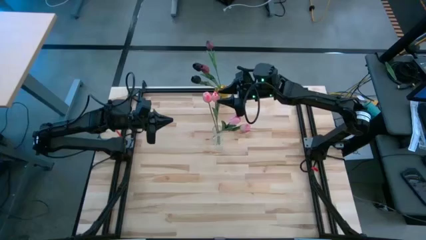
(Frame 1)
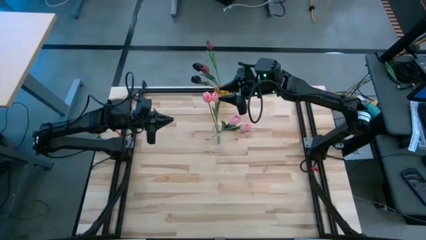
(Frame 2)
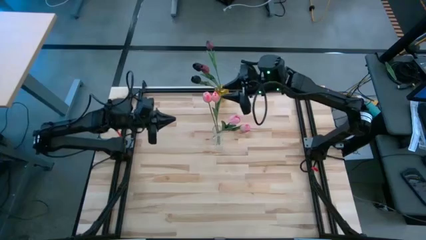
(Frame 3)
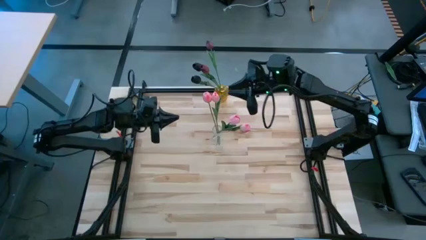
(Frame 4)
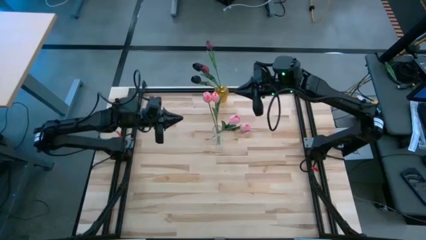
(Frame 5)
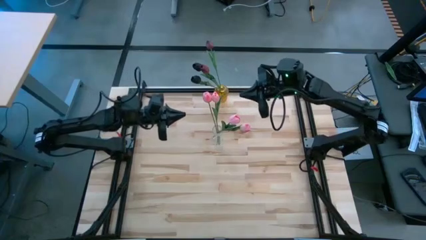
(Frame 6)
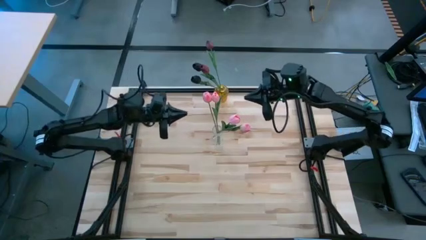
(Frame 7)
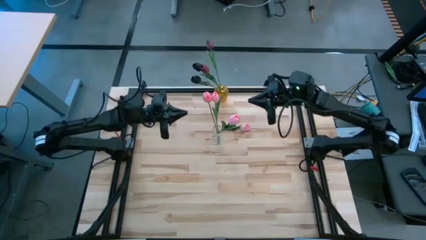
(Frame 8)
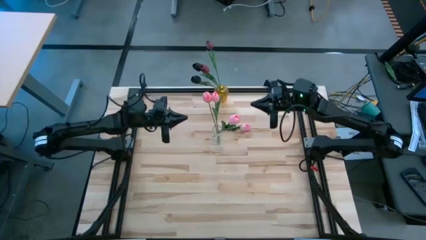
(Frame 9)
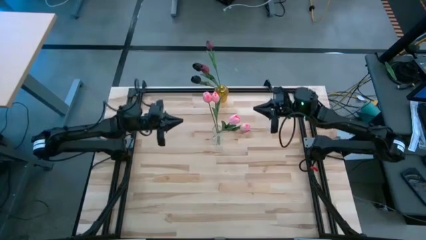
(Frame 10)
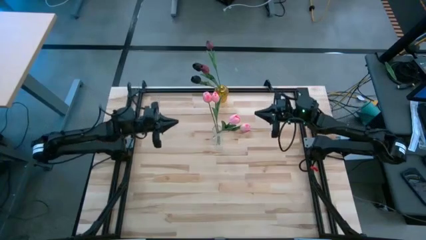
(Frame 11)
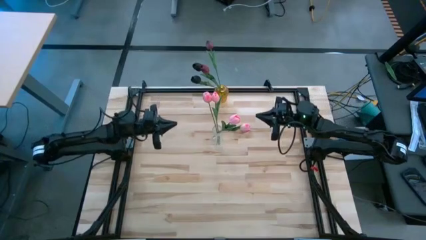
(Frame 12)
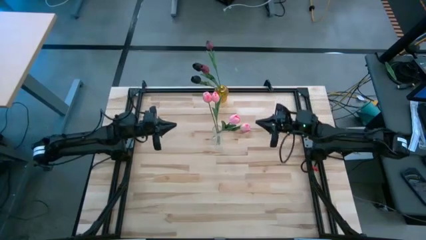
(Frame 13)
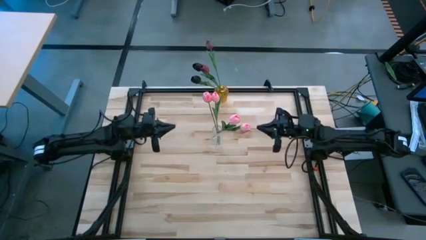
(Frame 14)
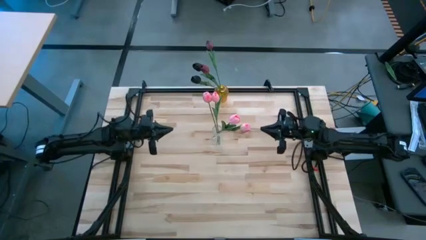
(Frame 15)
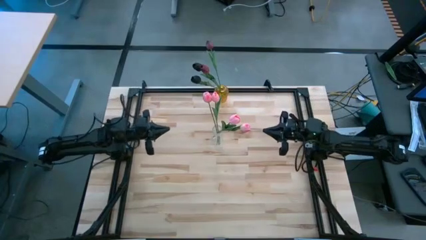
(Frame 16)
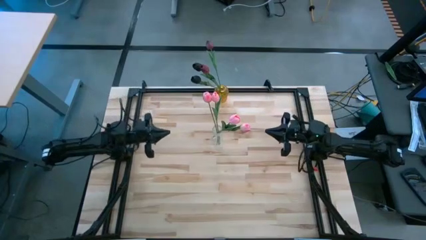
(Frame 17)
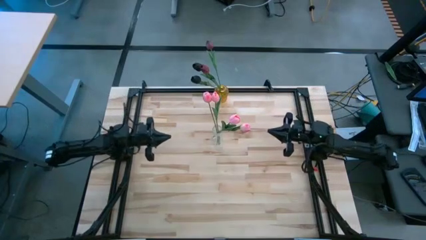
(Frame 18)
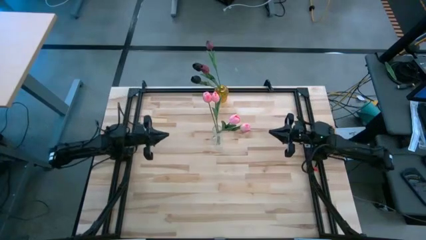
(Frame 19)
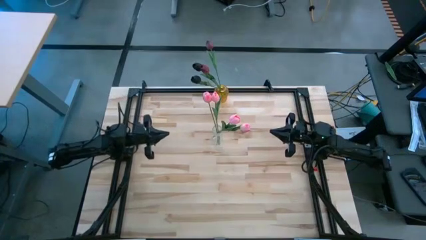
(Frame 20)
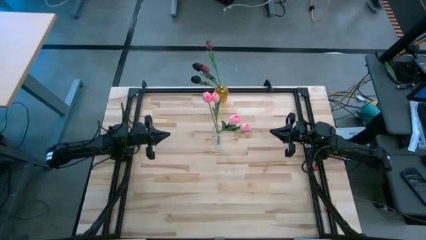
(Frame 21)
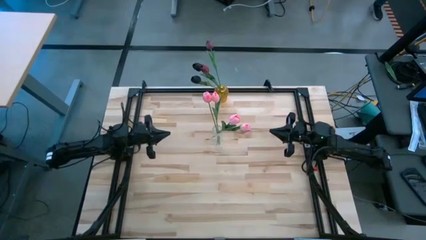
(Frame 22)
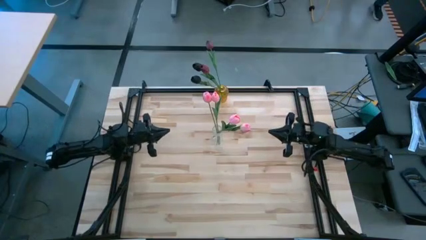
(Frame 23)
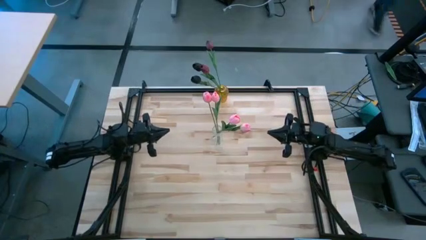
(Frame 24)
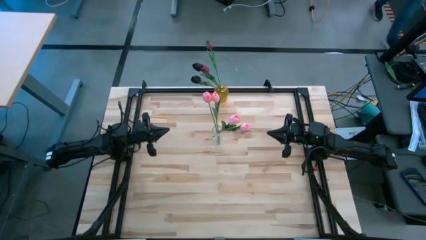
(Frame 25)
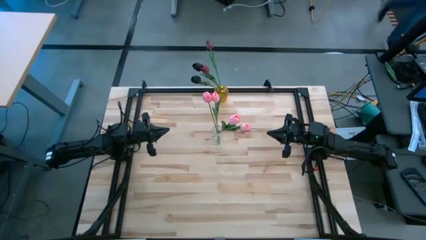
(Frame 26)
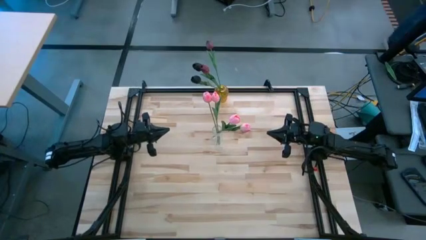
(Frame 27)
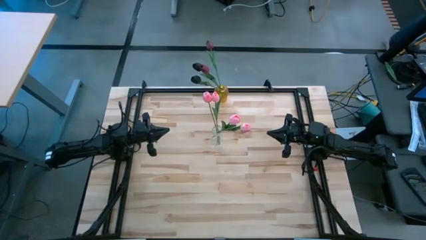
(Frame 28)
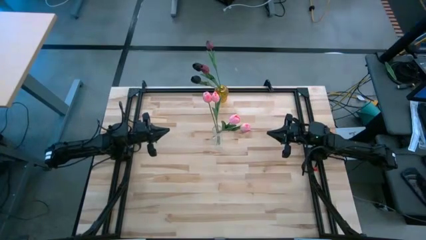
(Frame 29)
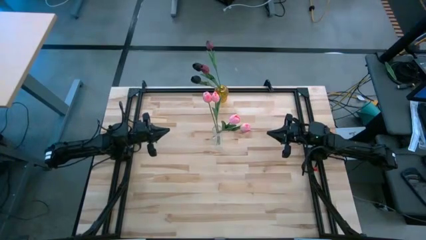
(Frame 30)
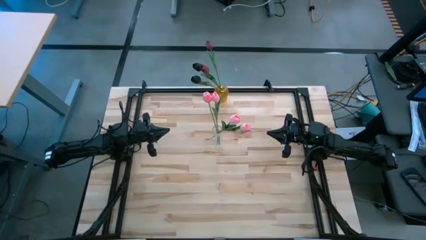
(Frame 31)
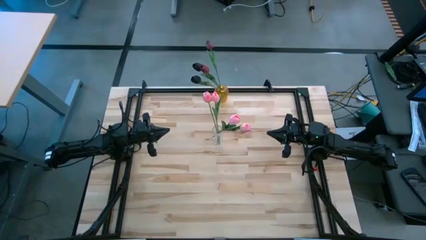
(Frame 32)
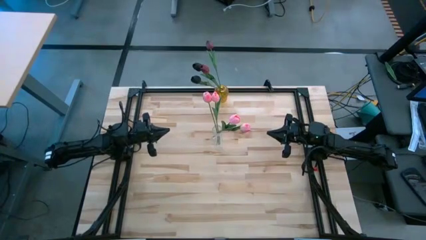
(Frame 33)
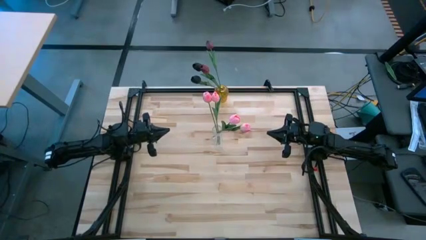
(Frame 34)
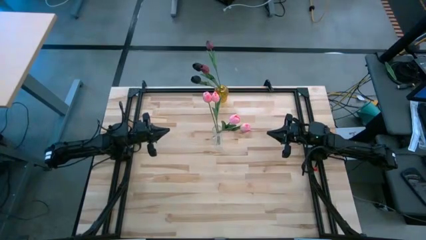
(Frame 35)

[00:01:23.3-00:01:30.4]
Task: Sort flowers into vase by color
Return To Home Position

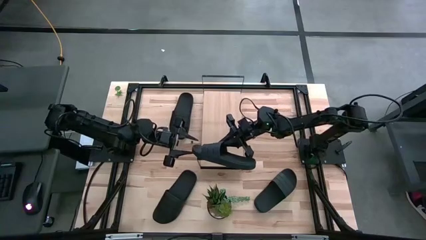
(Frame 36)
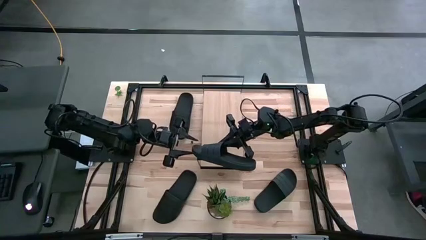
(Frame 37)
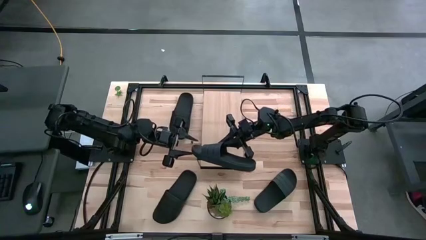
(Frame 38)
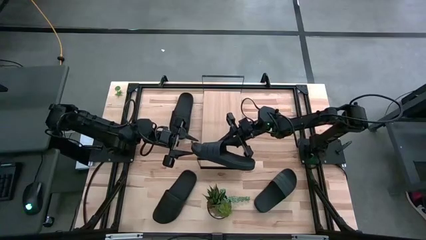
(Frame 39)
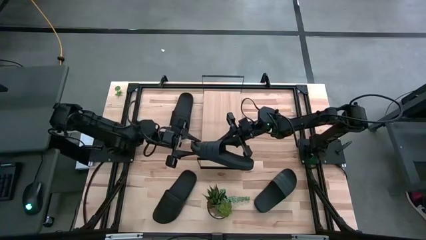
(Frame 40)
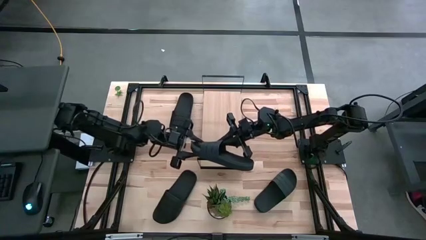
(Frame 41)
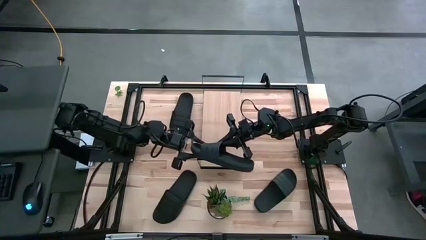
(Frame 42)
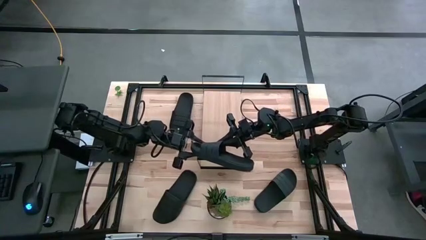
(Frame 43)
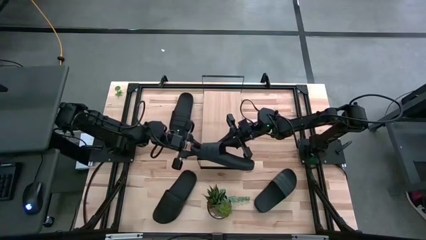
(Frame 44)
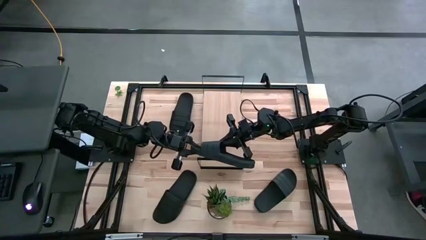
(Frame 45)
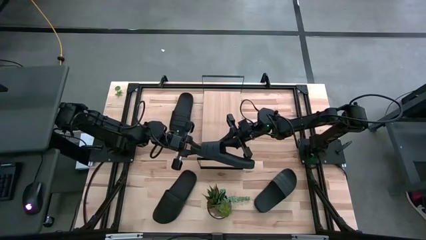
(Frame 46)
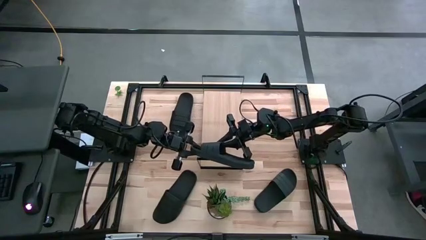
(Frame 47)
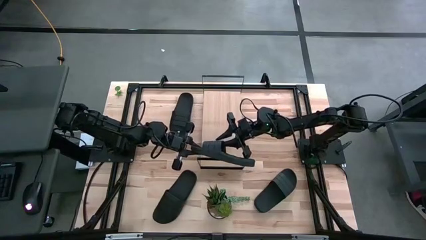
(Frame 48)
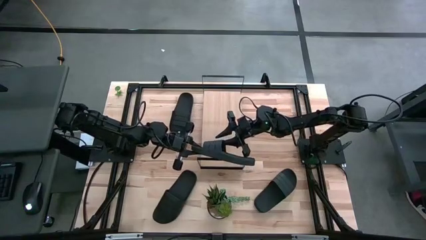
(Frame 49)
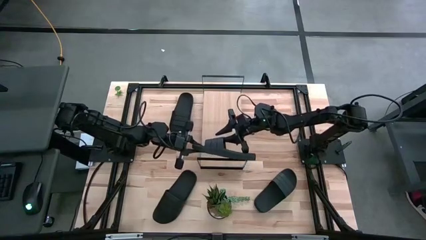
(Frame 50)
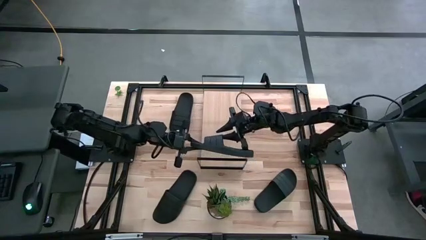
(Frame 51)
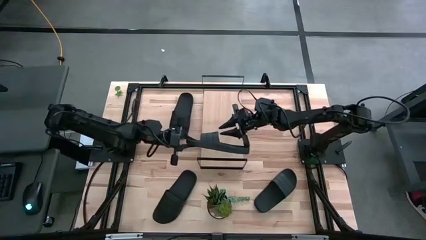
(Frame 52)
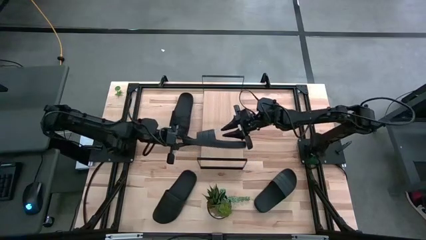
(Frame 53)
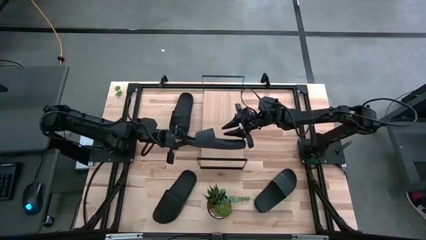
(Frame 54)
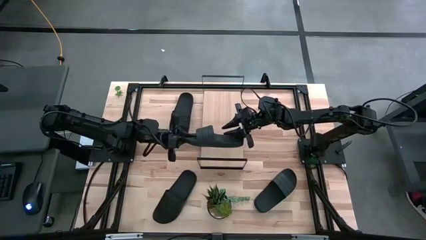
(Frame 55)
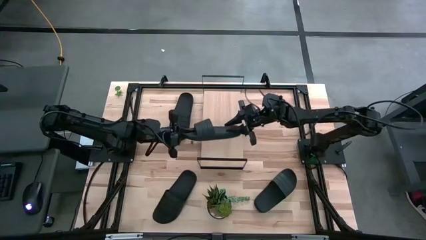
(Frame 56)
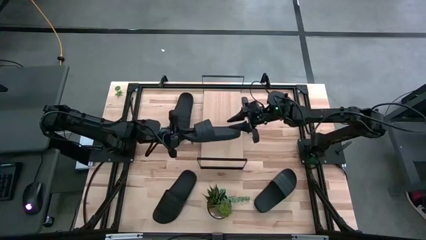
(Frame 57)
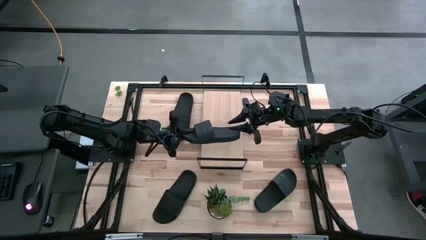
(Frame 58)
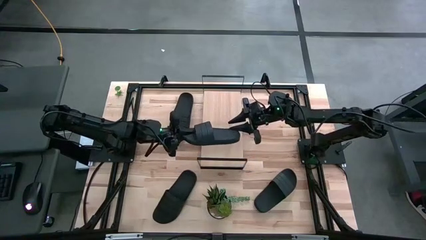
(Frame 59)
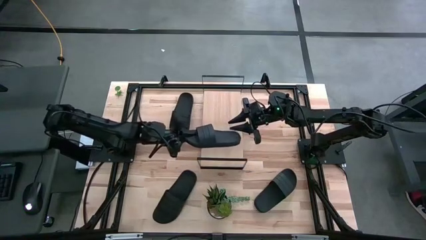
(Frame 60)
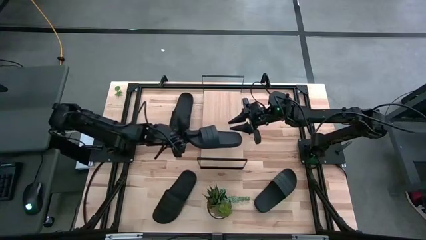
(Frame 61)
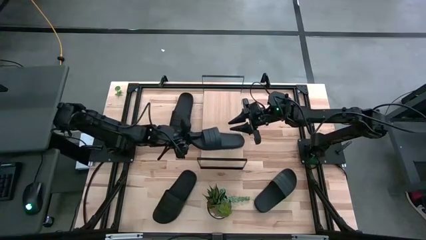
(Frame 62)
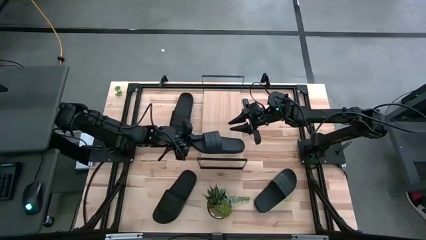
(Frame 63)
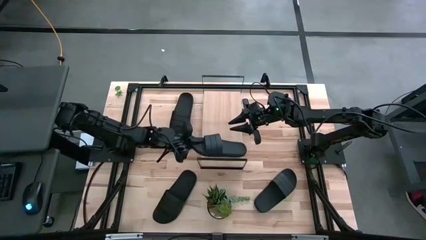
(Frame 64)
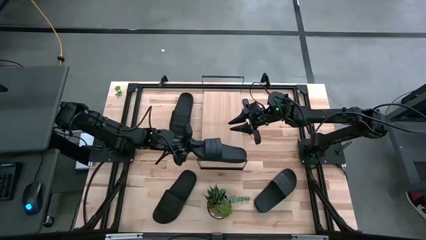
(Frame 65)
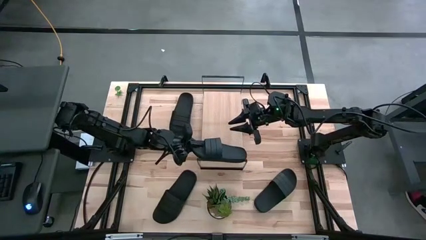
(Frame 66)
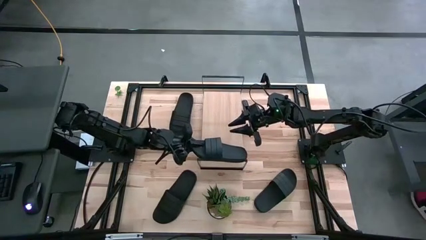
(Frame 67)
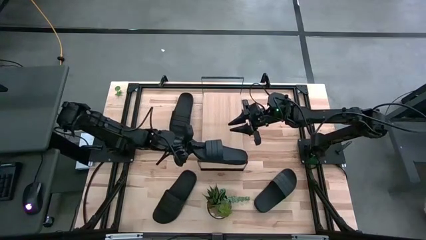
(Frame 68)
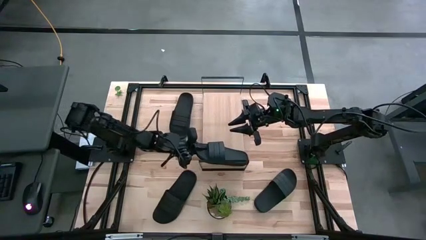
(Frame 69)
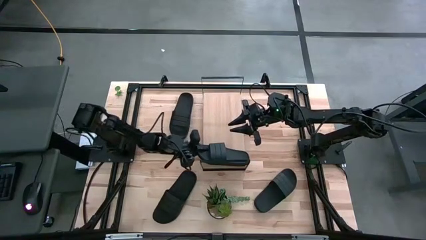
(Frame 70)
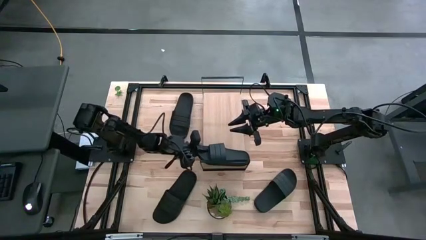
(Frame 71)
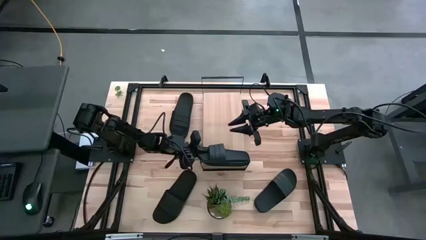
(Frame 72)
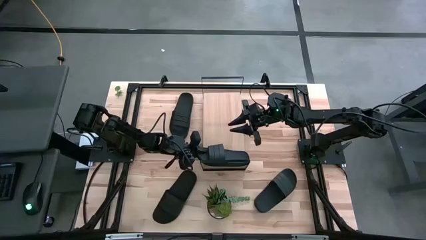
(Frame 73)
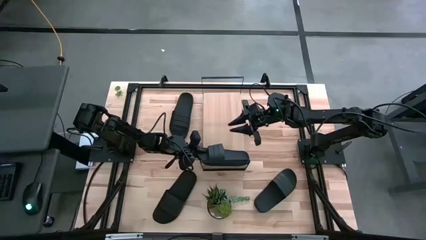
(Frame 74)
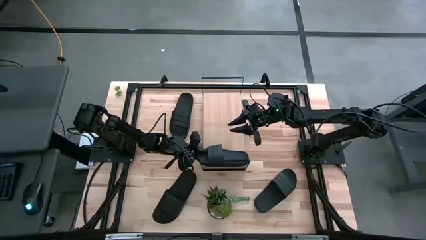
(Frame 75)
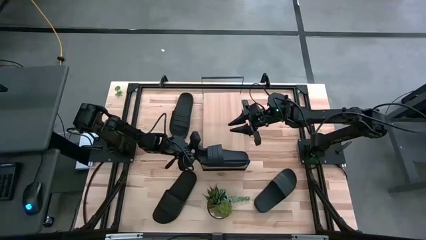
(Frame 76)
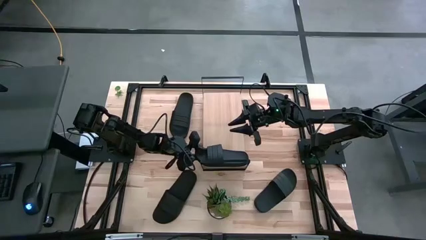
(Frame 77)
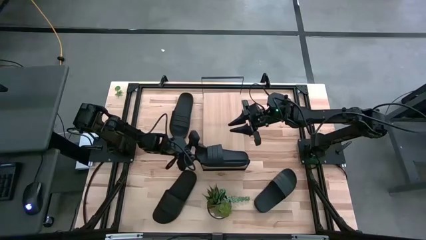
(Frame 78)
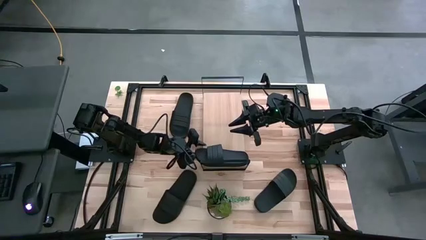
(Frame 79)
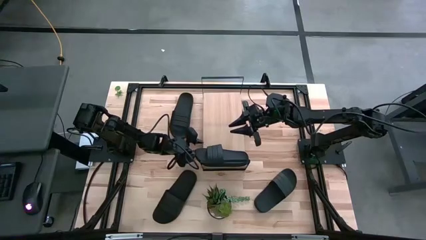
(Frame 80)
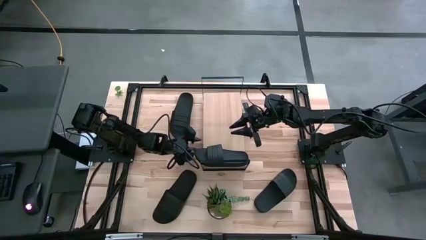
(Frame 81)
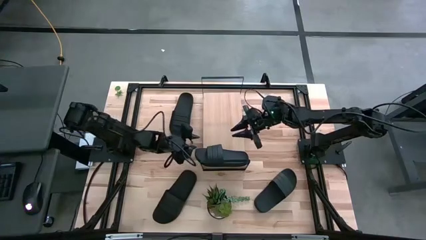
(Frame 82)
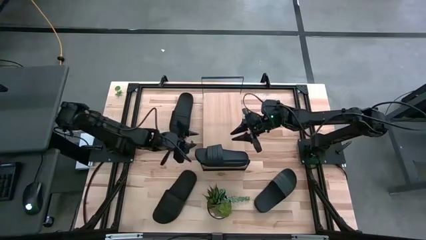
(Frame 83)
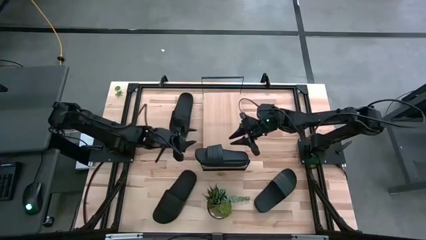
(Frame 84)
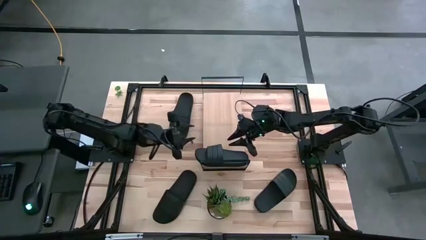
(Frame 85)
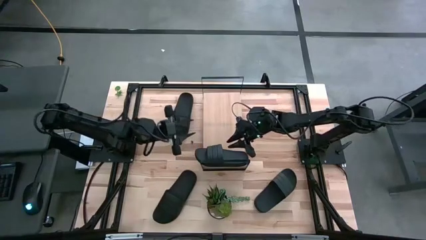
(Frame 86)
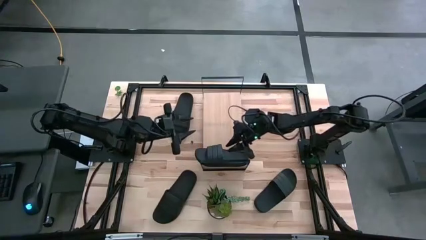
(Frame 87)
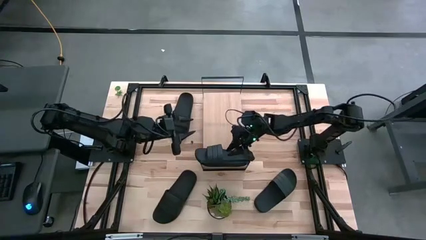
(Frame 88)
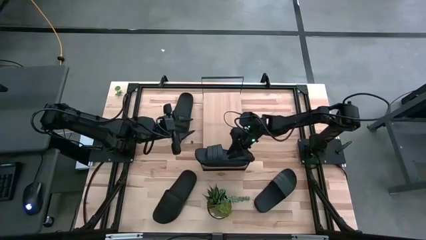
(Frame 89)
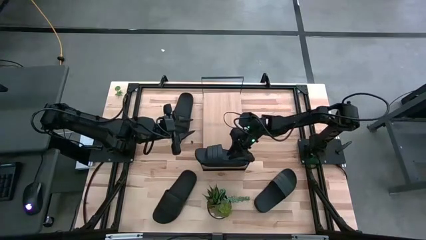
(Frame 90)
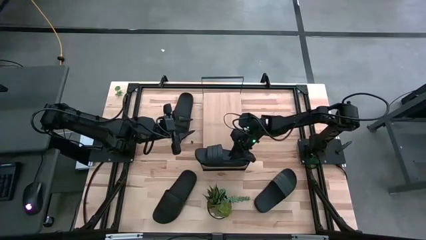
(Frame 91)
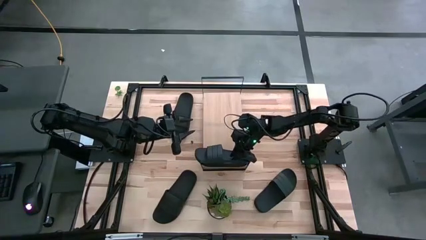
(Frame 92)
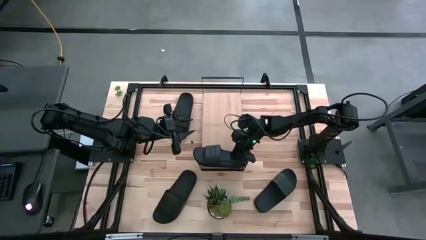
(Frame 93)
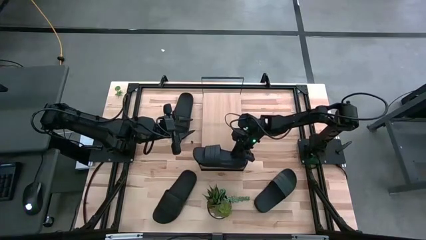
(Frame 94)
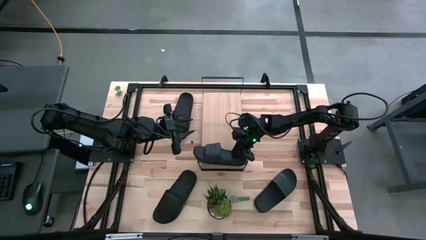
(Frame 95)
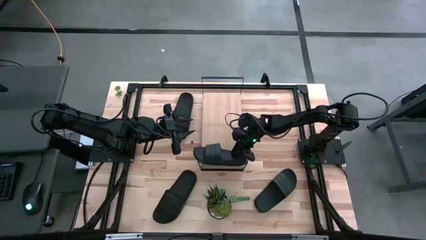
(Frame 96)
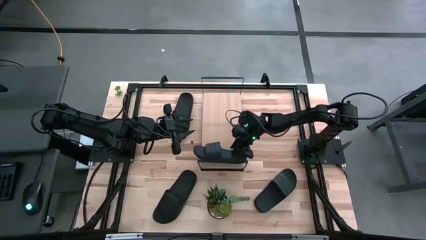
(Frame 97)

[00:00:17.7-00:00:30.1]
Task: Pick and place slides into the shelf
Put the top right black slide on the shelf
